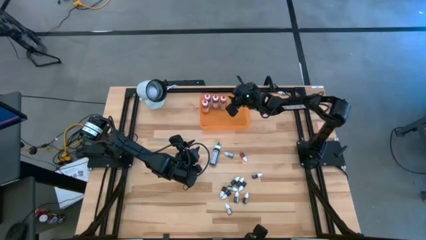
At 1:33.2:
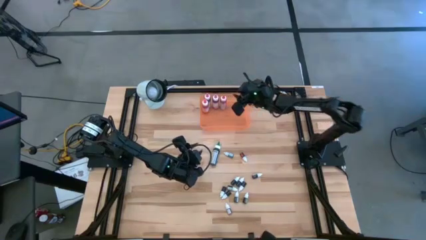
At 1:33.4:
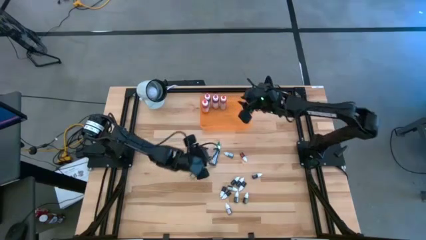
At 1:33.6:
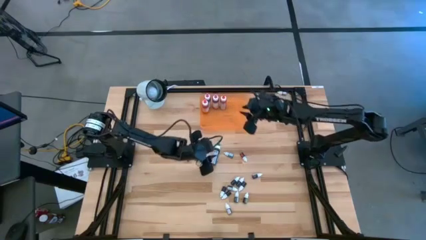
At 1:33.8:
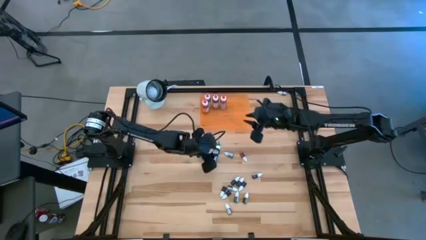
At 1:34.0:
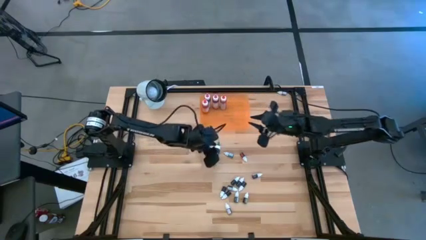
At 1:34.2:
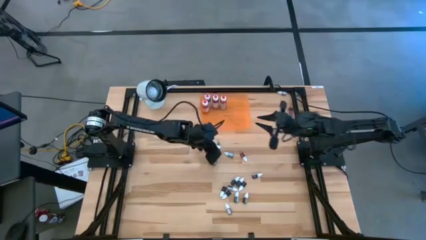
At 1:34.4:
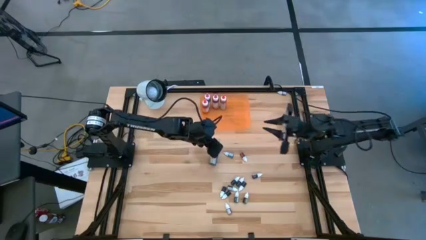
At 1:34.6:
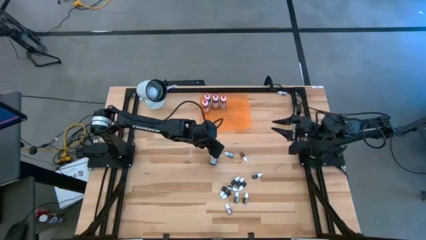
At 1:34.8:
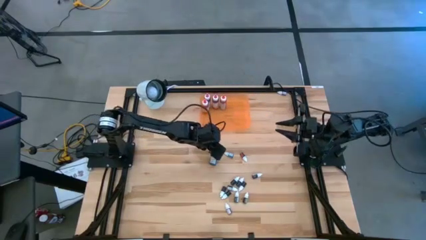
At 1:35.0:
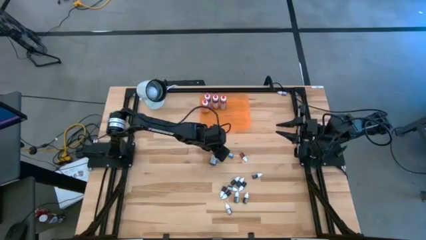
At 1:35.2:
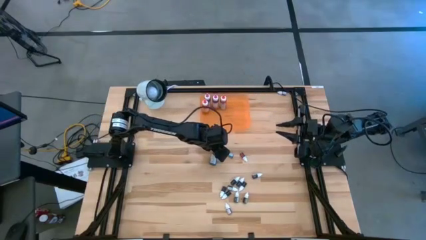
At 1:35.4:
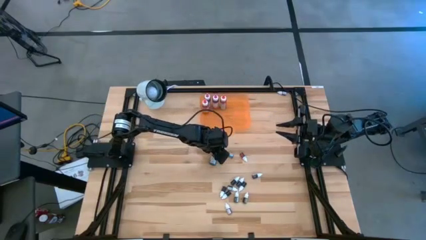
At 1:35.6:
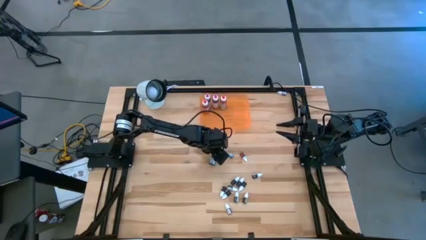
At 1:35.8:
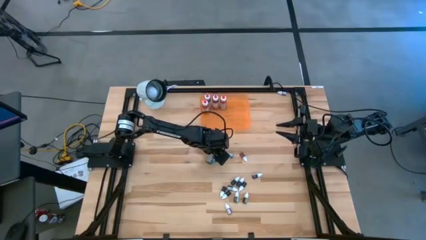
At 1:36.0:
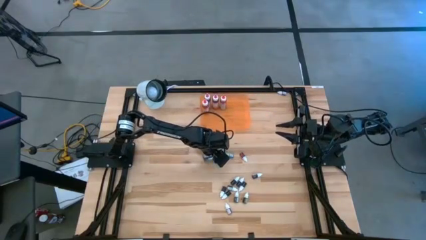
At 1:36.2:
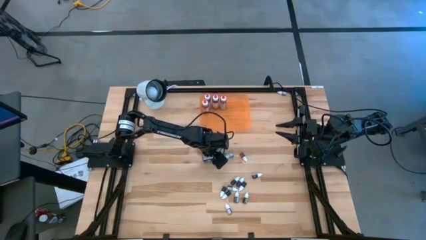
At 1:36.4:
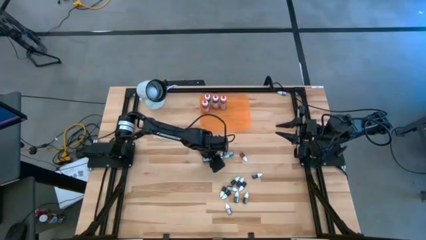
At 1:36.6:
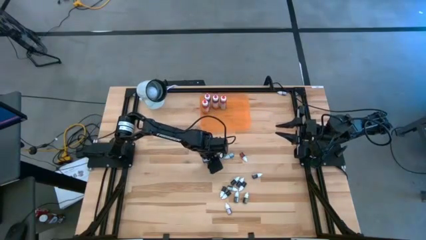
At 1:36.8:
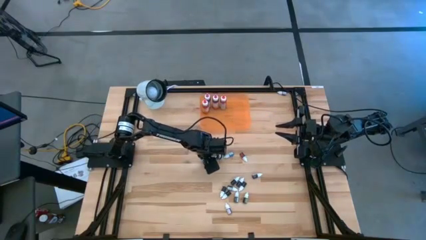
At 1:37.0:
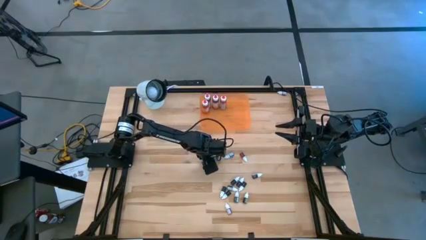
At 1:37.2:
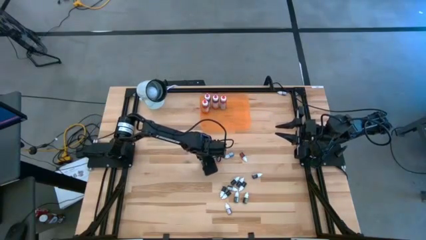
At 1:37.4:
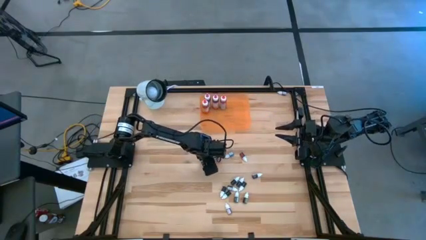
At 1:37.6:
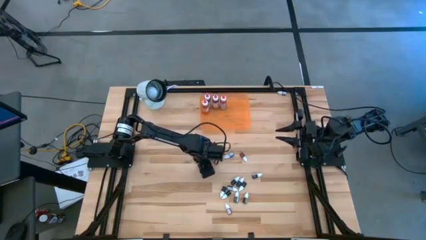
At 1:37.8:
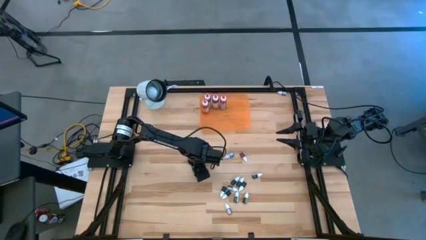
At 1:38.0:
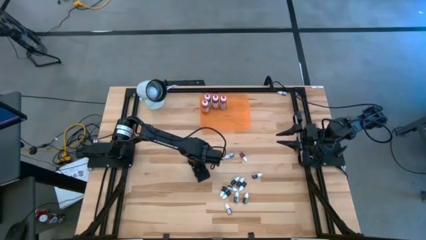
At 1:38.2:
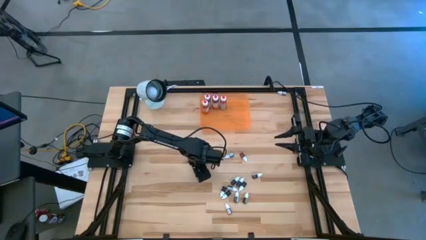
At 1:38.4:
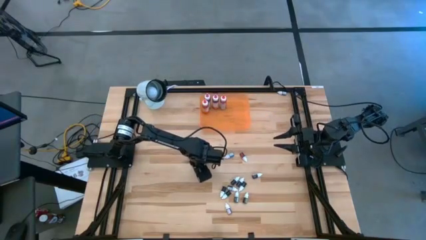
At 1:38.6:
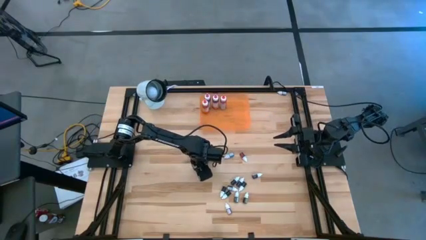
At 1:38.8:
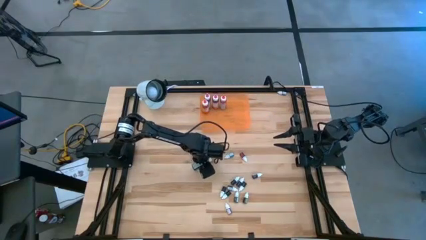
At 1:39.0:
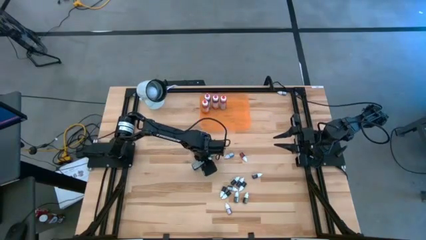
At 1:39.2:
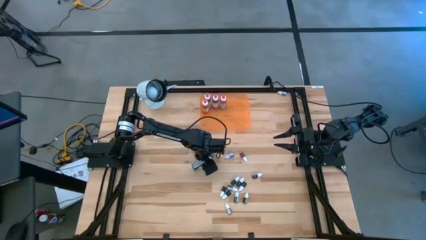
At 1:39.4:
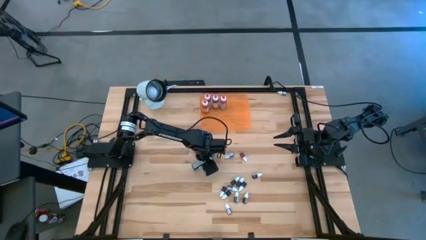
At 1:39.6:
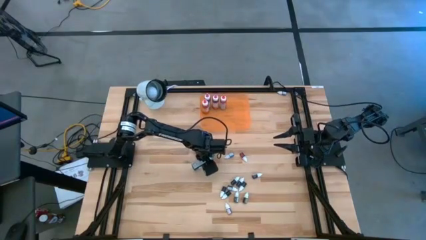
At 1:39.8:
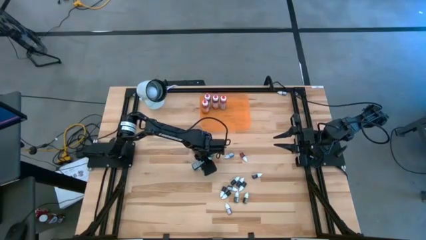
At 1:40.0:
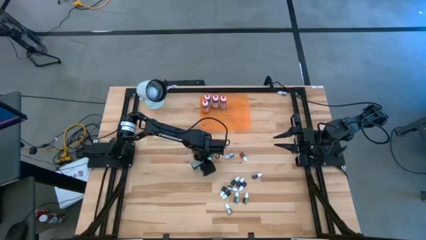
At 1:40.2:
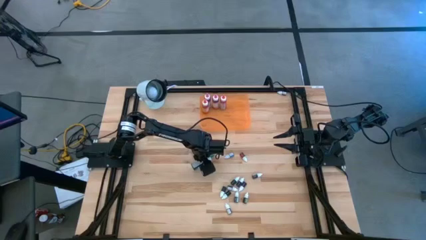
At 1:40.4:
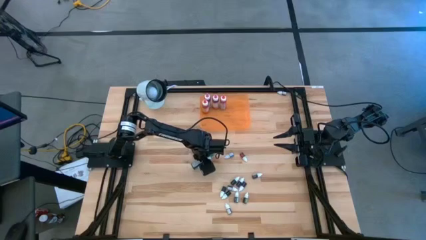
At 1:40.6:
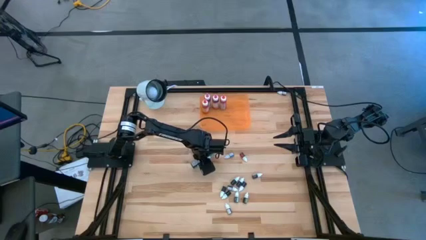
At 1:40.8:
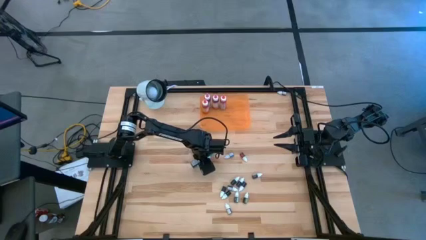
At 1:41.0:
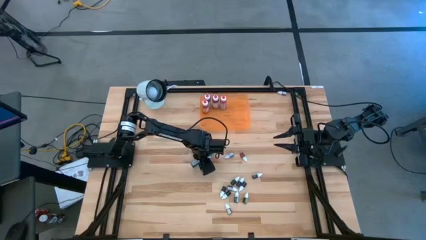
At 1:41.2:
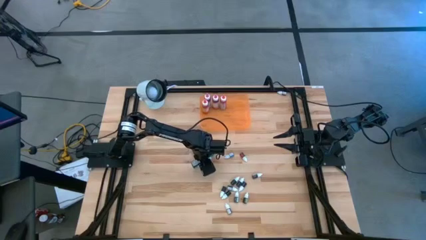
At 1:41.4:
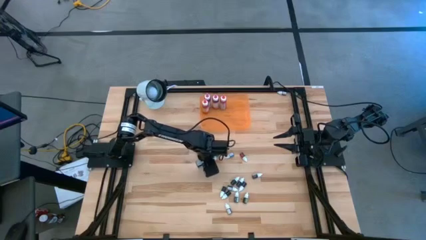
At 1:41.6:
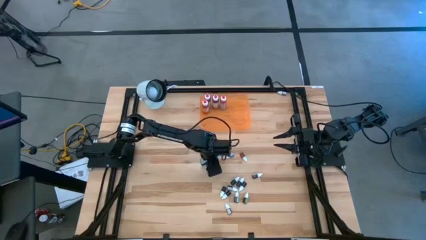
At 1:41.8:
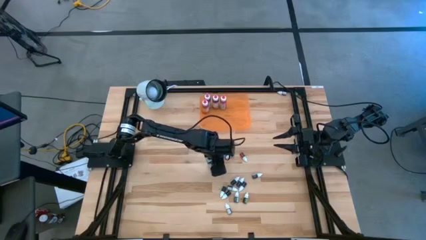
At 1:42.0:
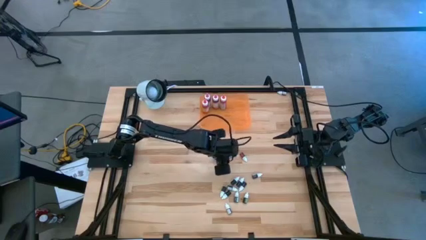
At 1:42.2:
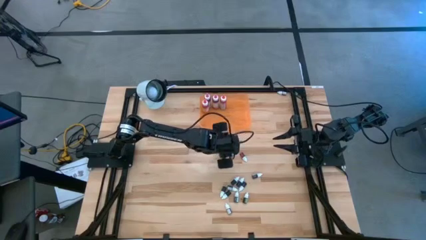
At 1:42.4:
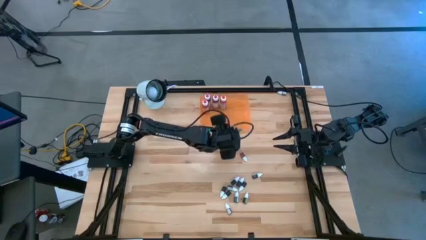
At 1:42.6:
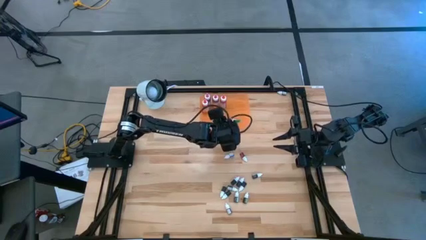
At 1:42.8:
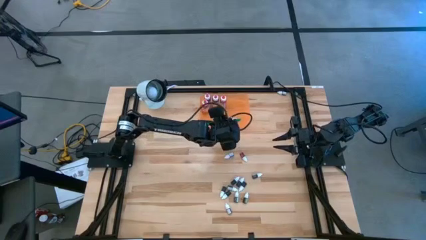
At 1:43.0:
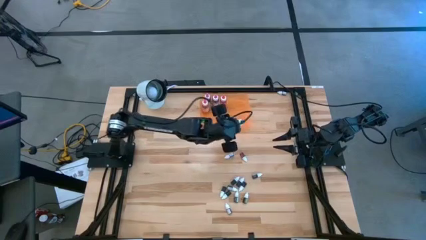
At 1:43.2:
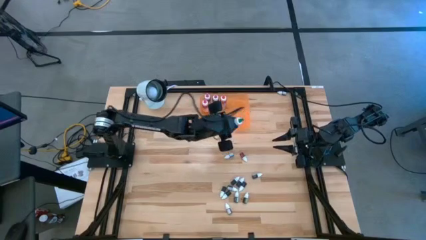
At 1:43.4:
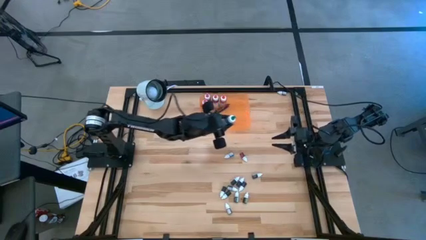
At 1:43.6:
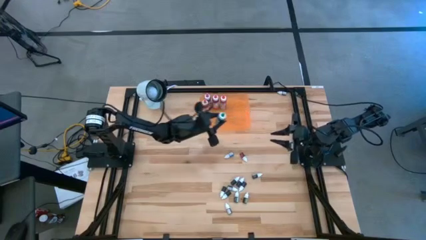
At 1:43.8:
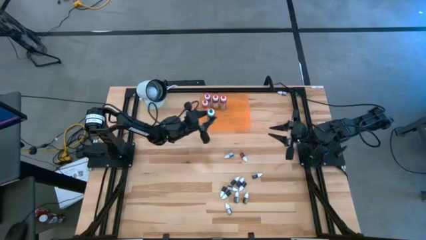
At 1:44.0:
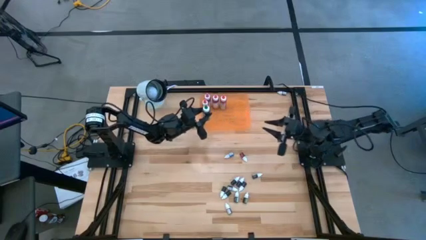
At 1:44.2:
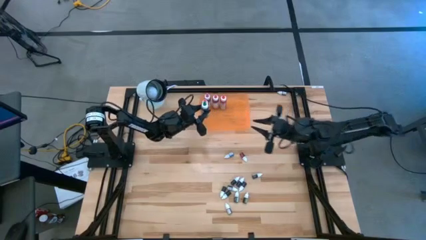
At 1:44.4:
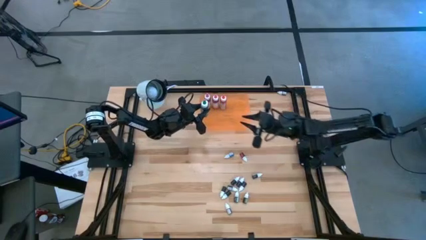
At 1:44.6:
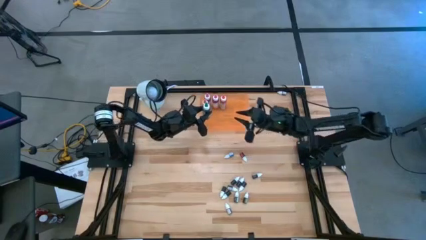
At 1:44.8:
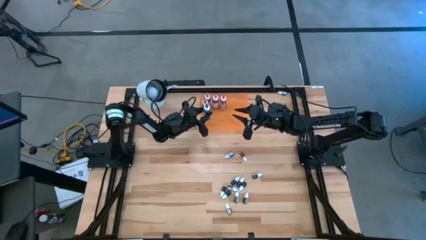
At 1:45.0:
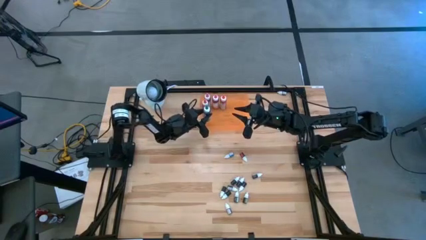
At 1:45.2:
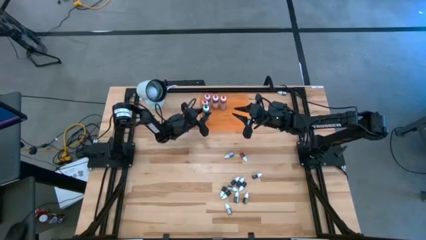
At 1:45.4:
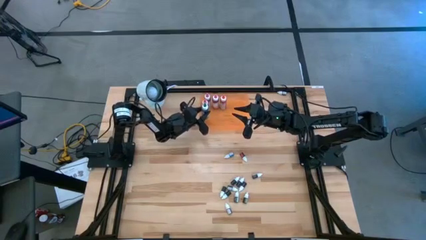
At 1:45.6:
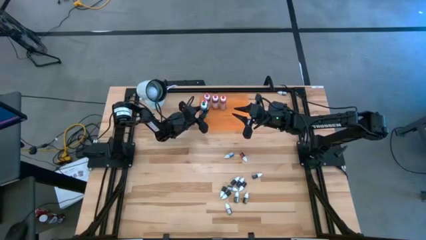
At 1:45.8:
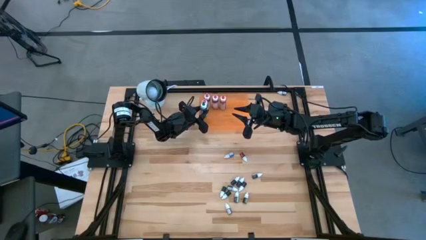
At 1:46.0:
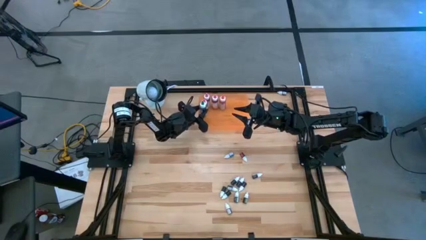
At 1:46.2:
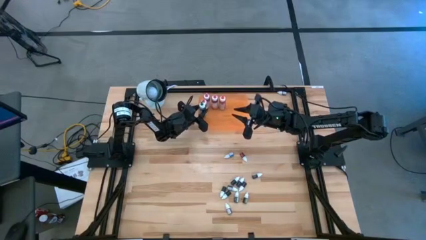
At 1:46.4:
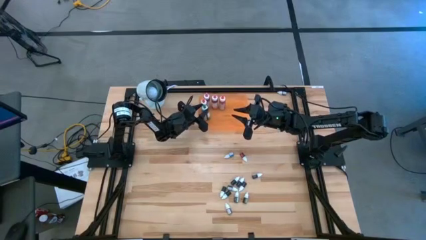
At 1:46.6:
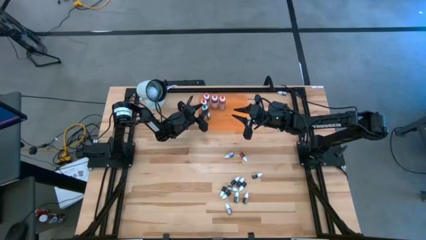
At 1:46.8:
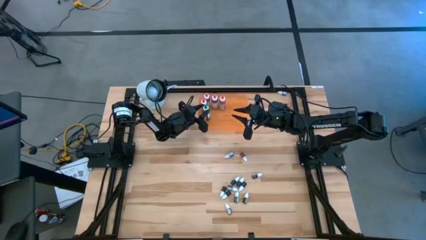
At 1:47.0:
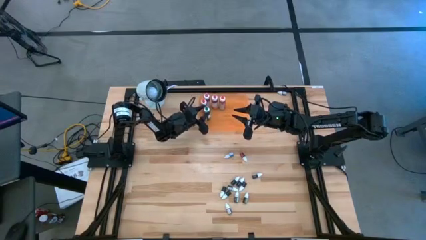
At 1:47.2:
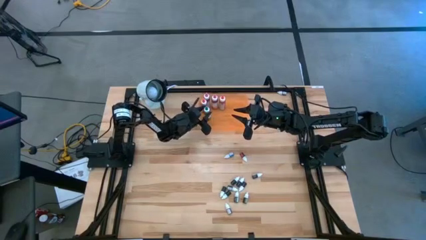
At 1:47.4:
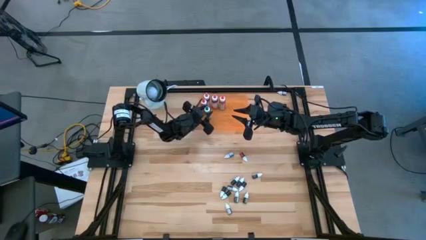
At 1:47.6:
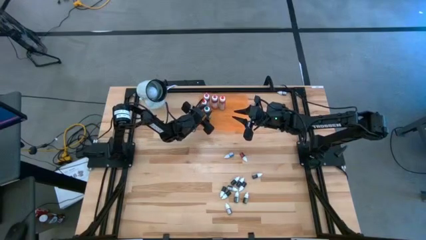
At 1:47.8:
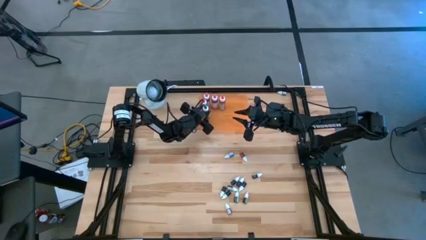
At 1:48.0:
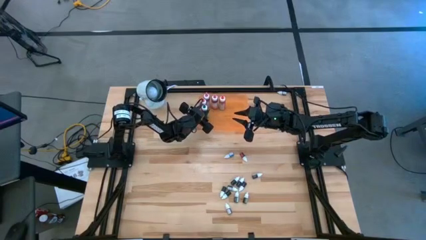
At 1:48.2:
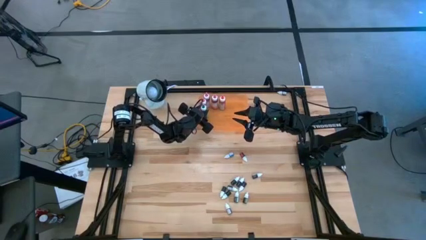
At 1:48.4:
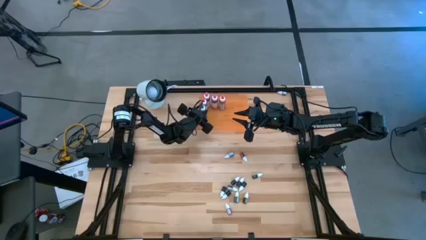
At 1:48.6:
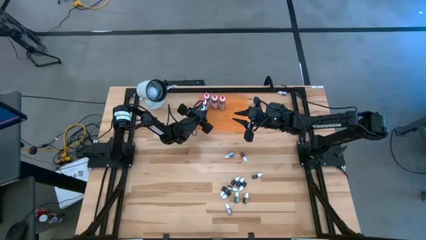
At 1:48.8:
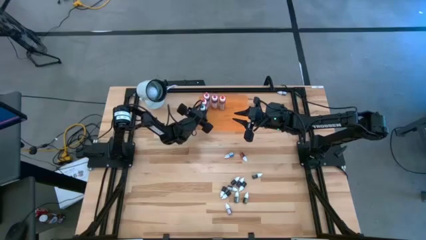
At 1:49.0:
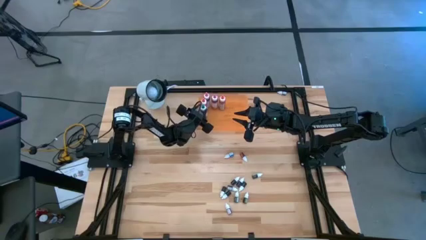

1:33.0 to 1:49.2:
Task: Pick & Place food coloring
Put the large green food coloring bottle into the orange bin
